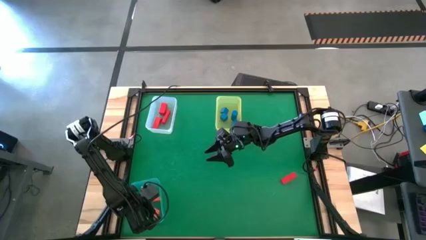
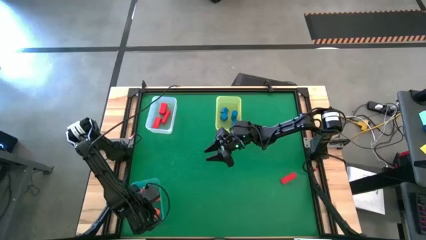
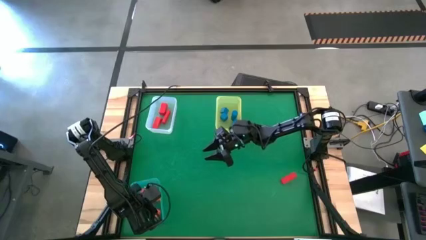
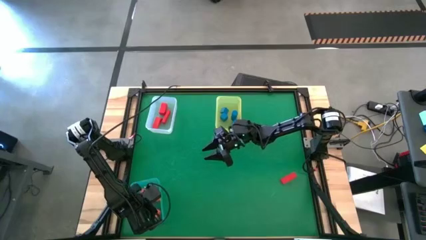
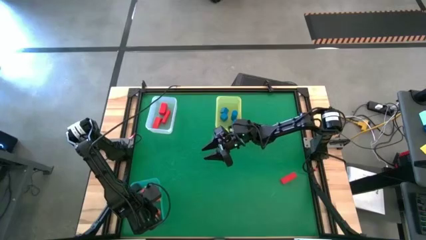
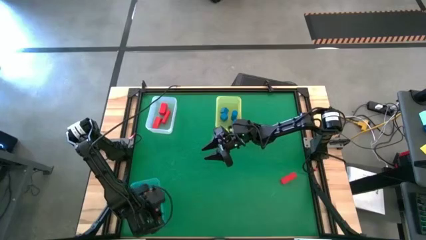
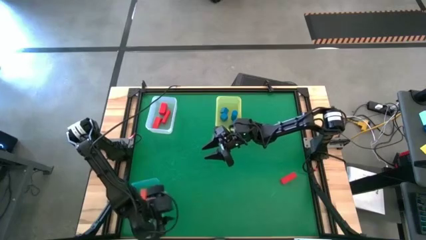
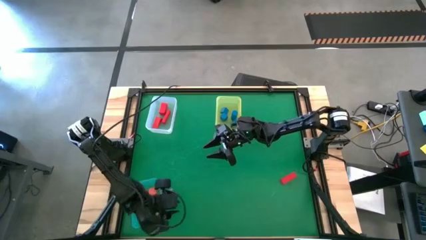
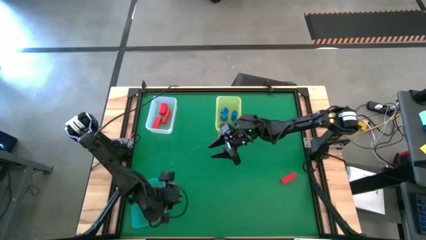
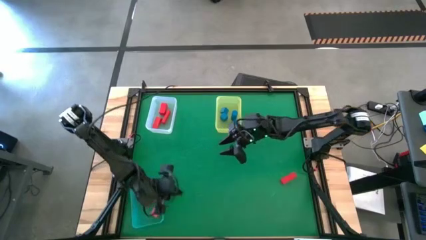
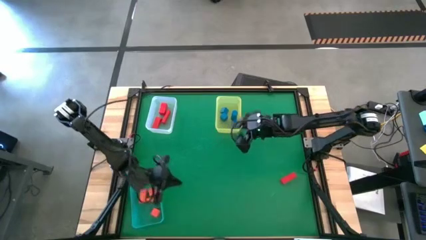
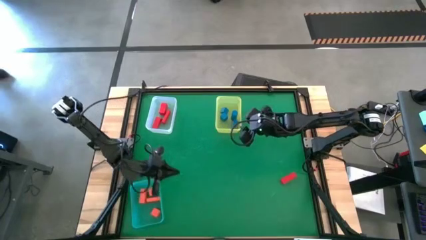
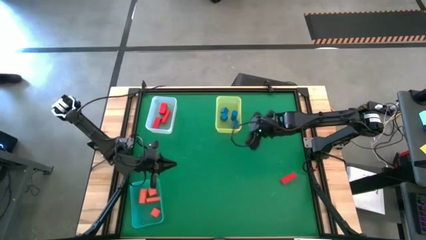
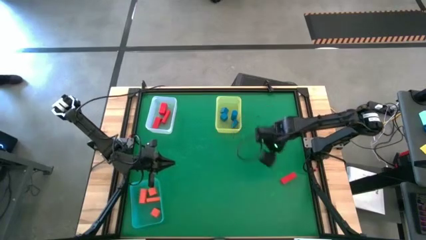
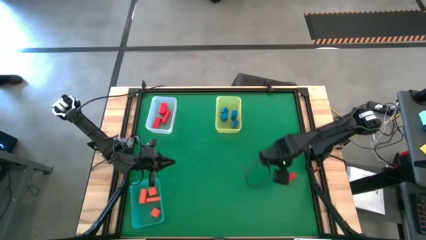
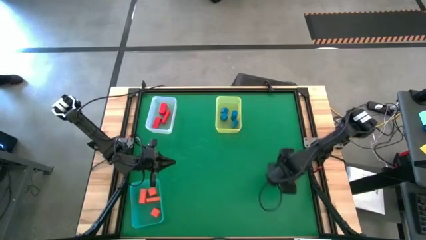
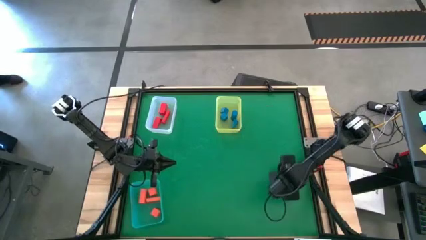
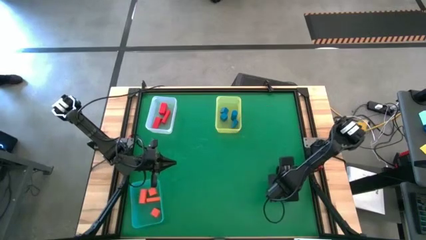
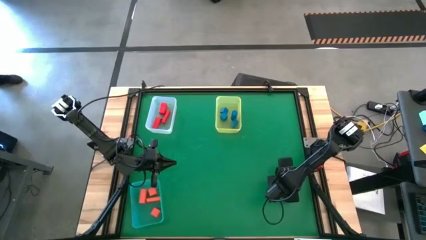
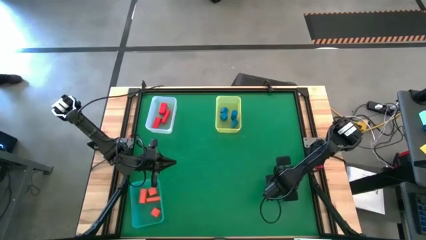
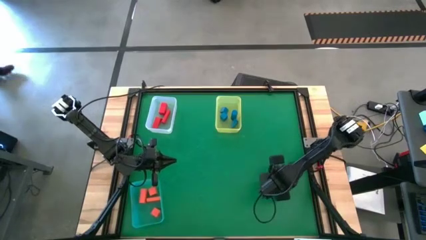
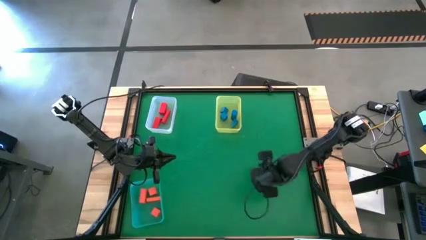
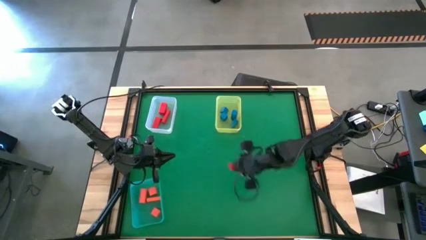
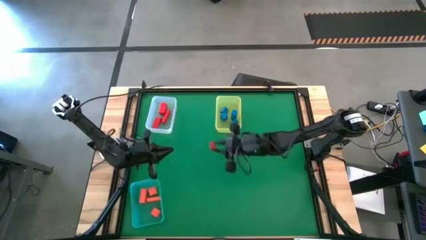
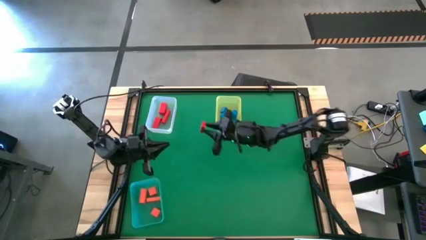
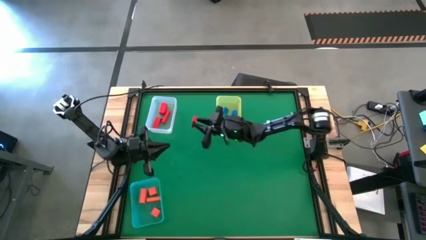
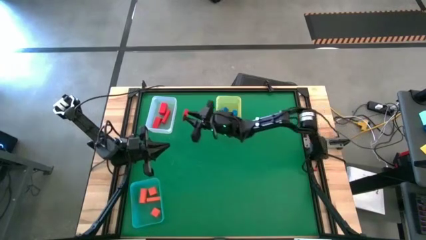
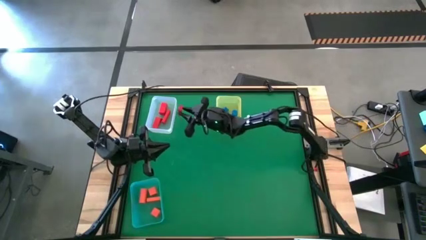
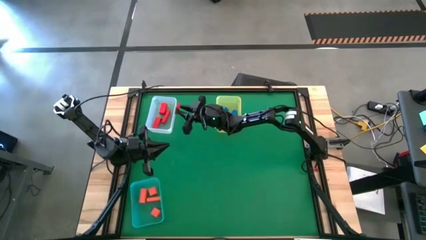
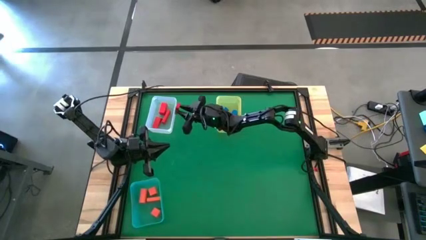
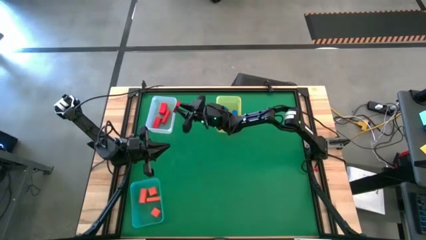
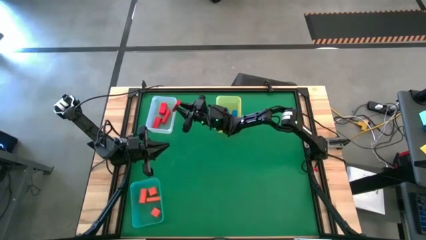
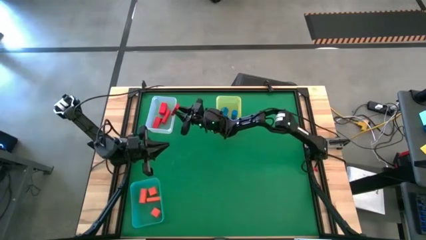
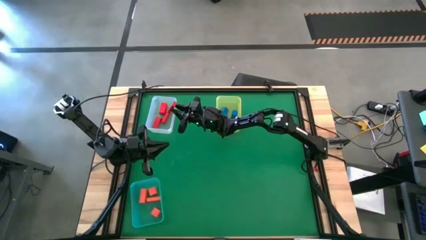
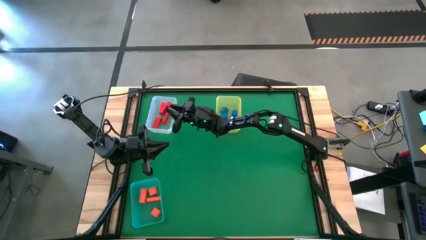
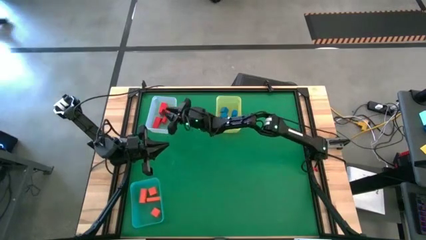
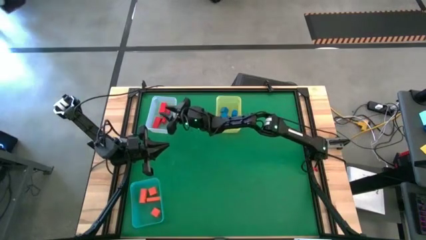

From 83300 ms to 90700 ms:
Task: Sort & place blocks by color
Put the red block into the white bin

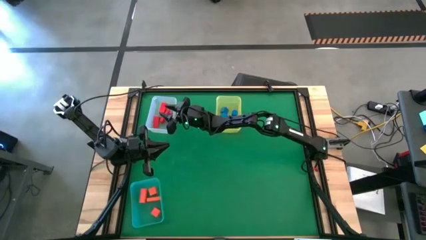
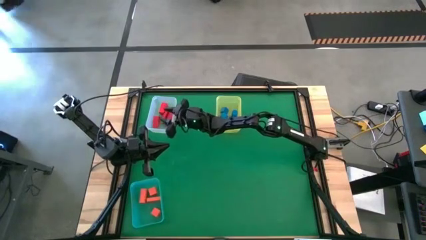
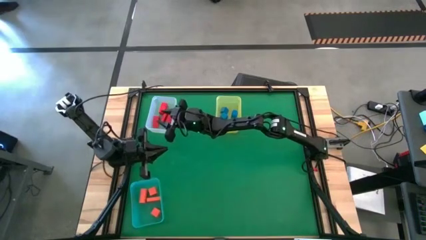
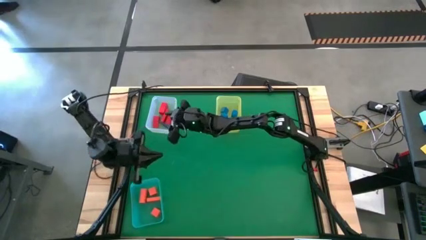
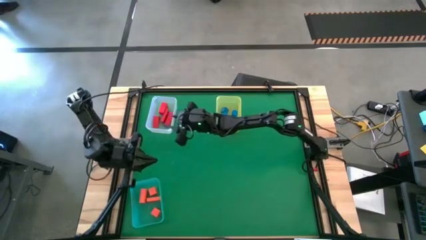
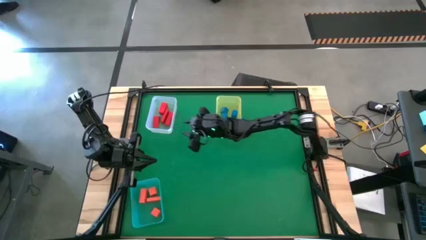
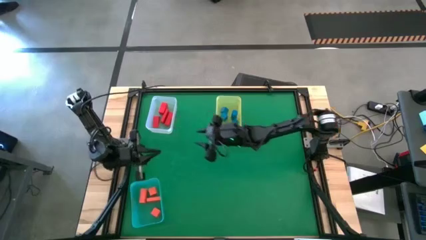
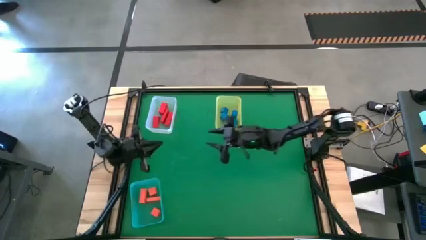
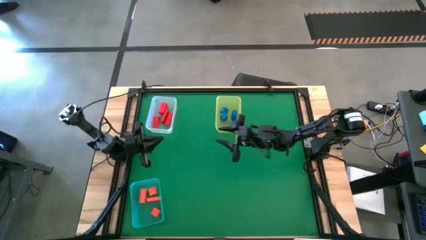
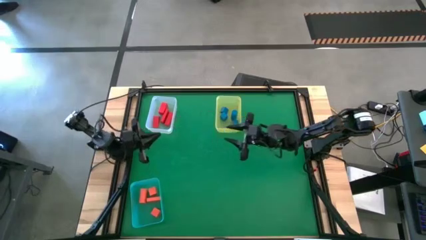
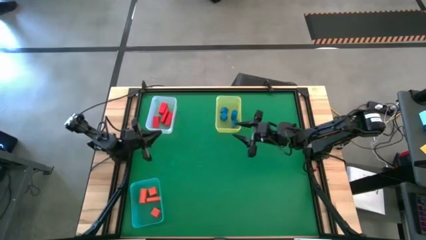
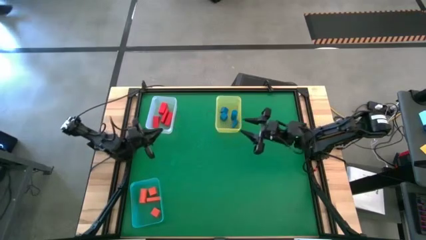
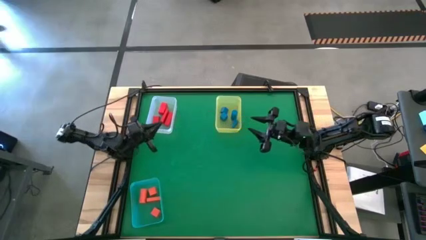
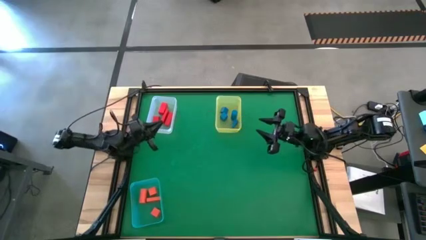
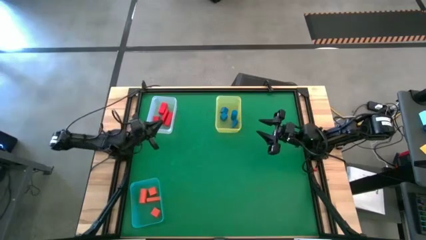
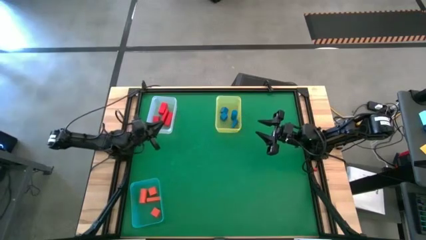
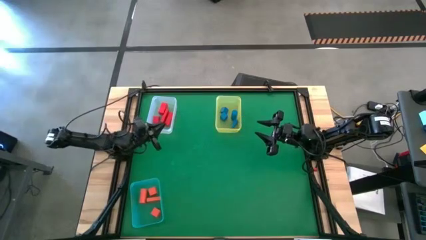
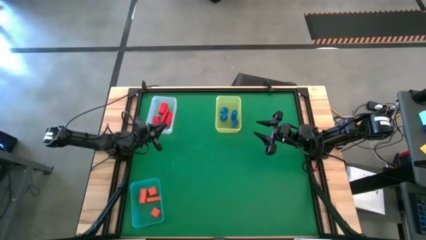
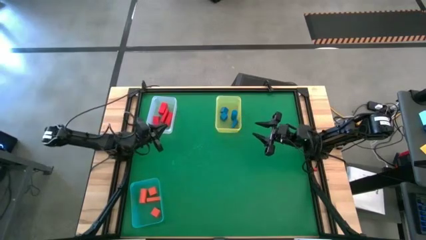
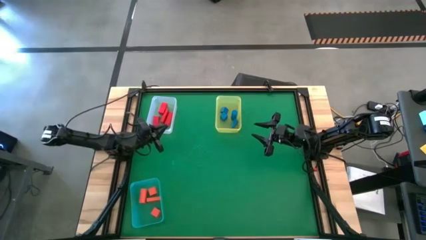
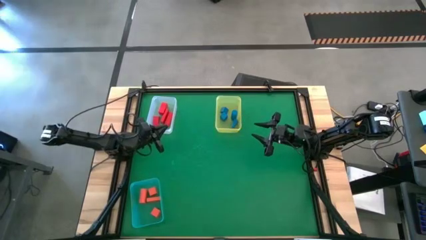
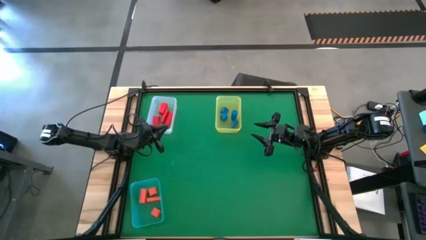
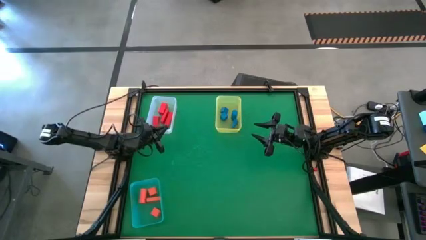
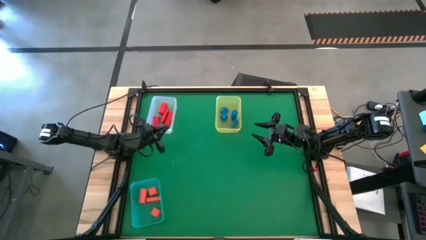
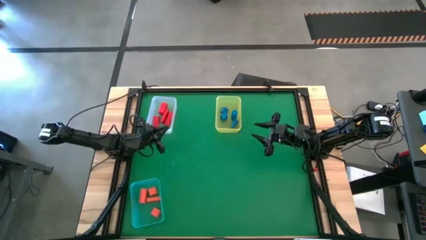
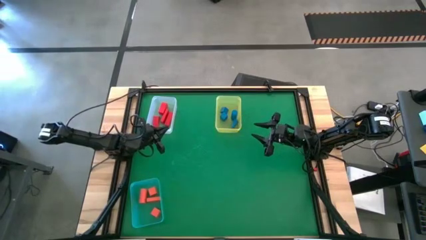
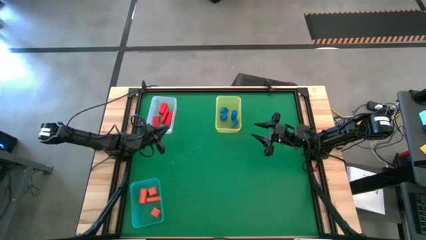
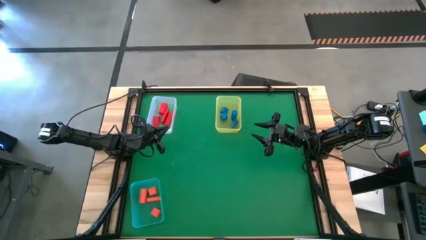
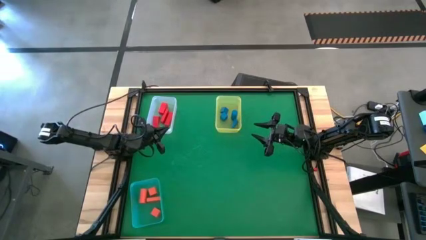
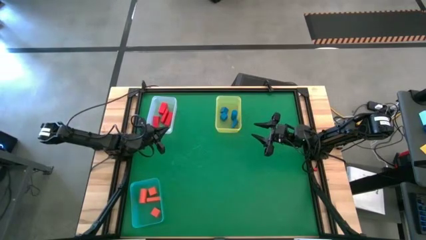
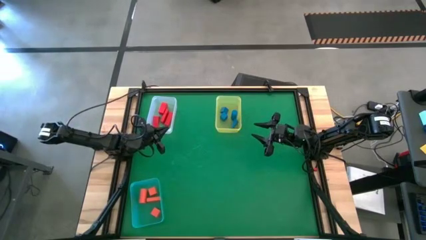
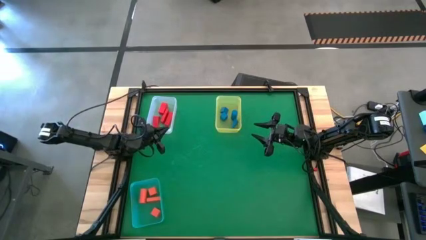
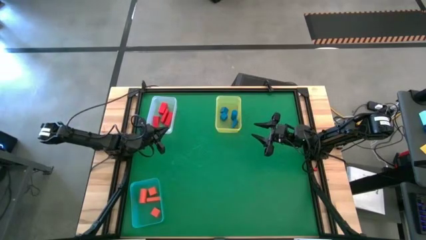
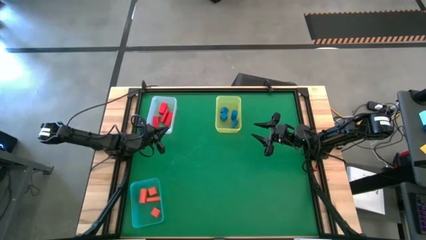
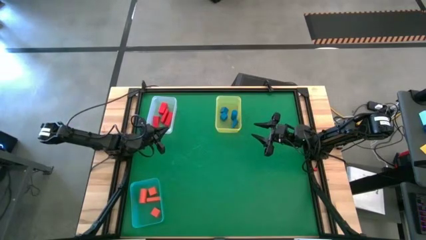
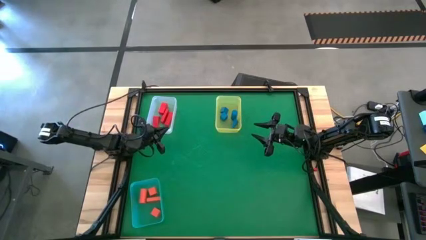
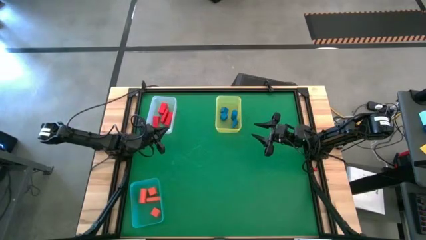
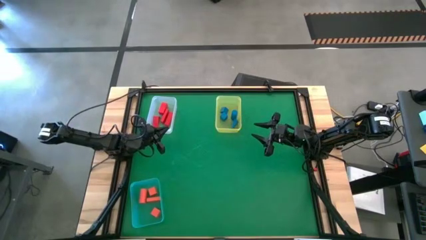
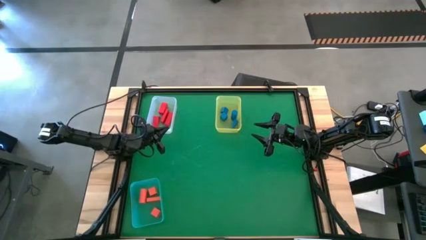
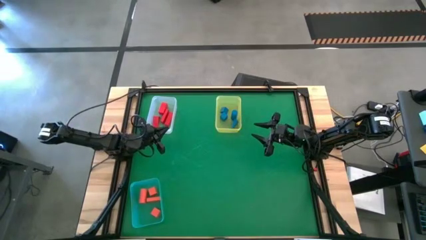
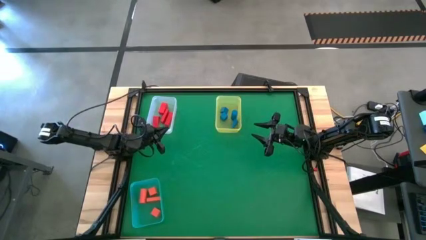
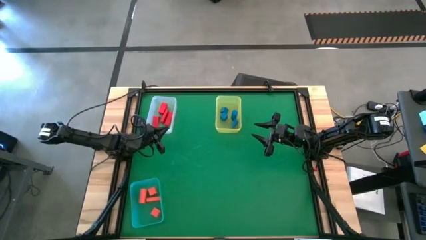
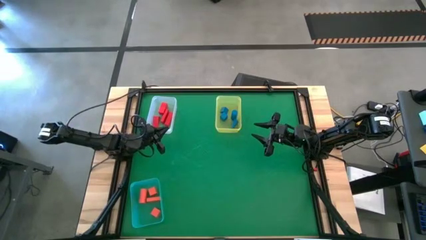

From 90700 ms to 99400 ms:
Return to Home Position
